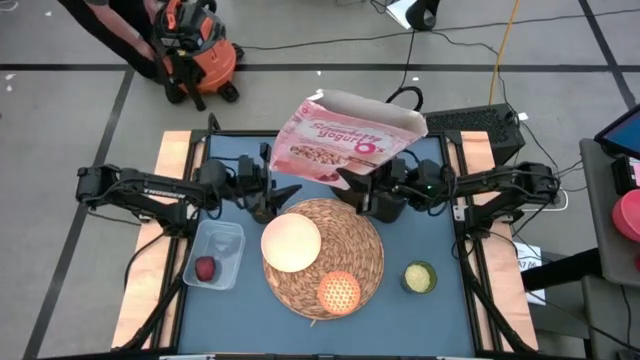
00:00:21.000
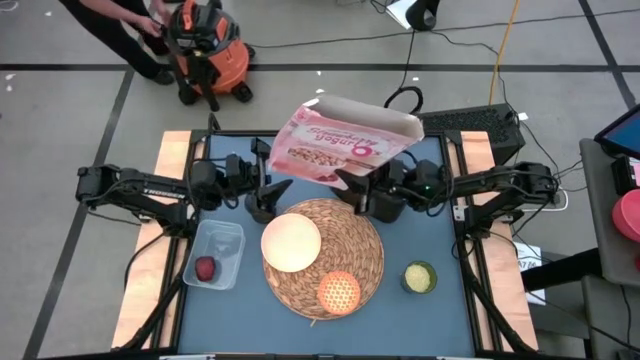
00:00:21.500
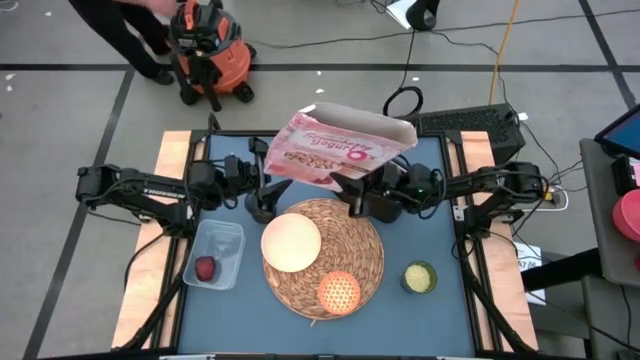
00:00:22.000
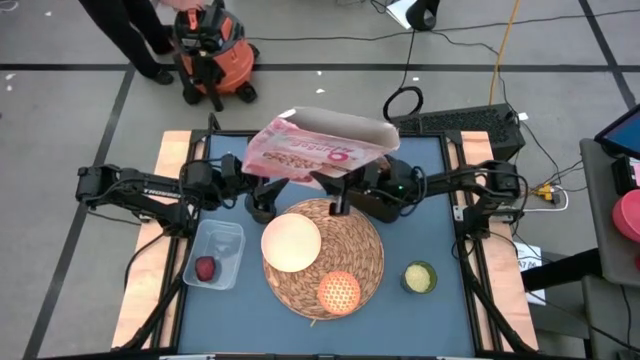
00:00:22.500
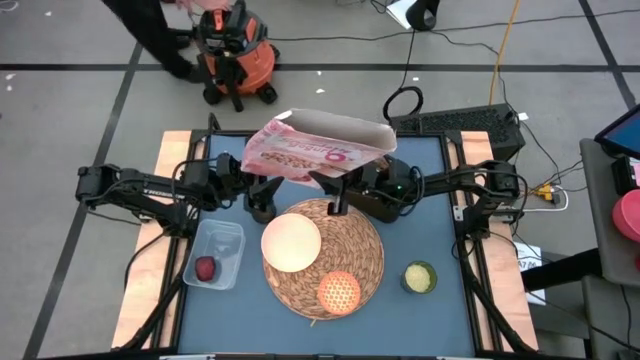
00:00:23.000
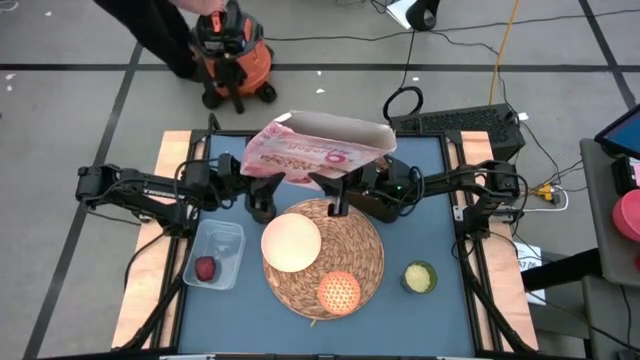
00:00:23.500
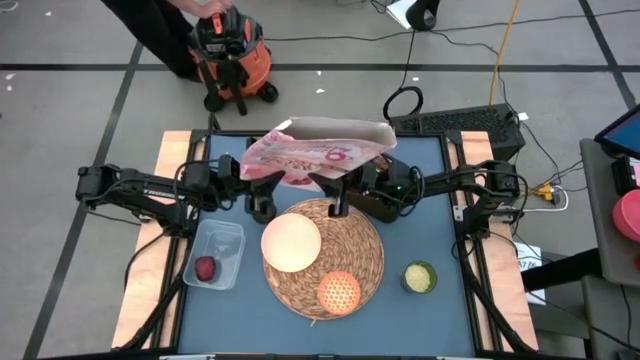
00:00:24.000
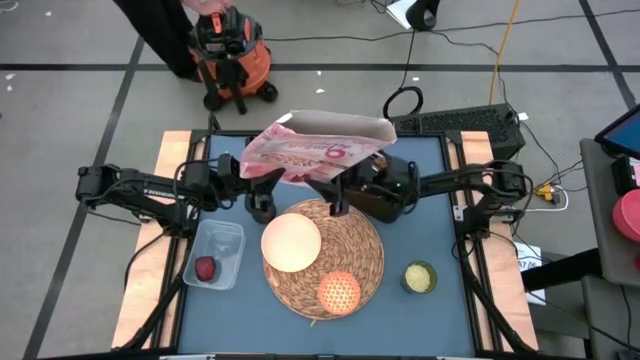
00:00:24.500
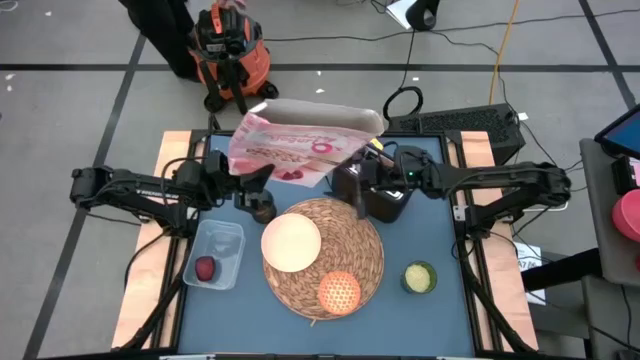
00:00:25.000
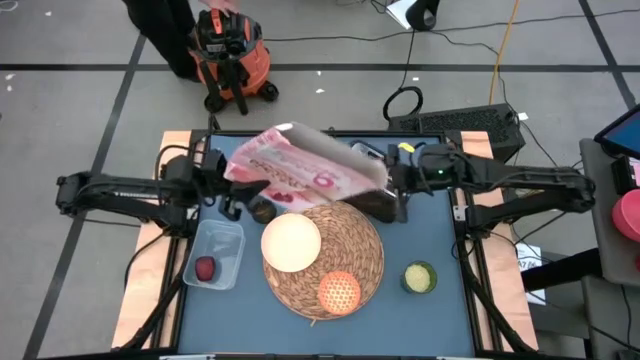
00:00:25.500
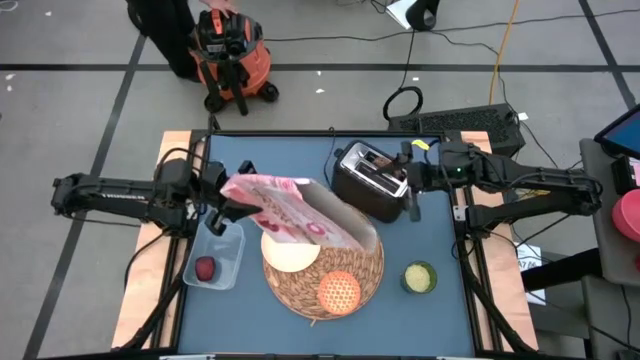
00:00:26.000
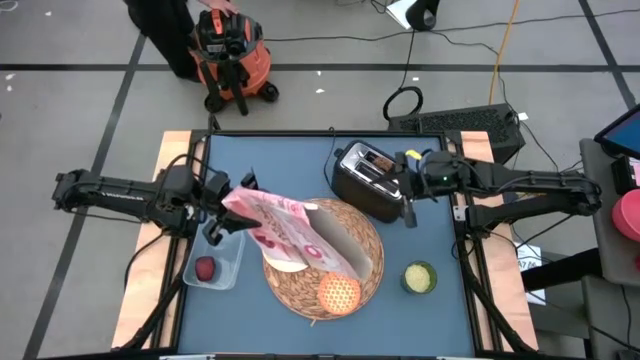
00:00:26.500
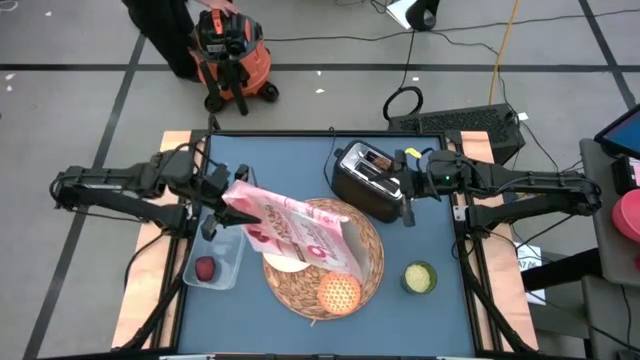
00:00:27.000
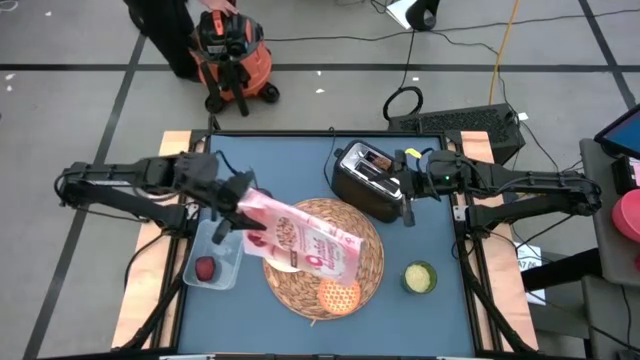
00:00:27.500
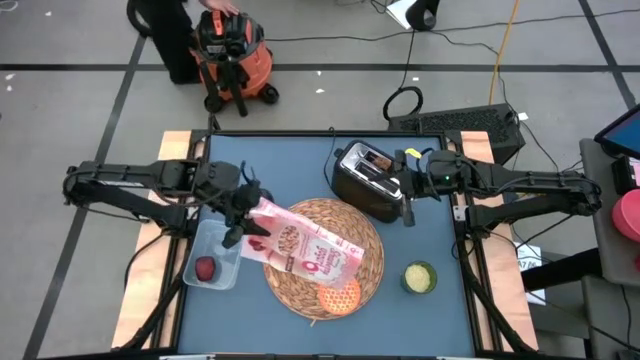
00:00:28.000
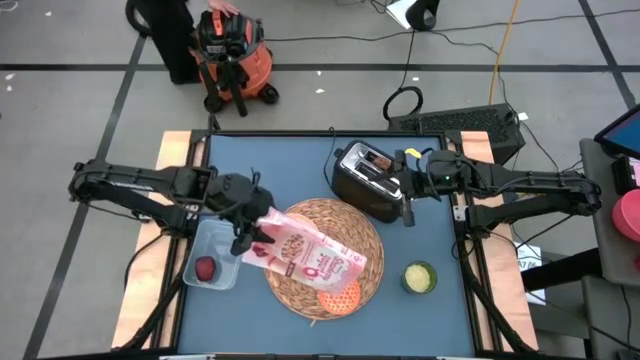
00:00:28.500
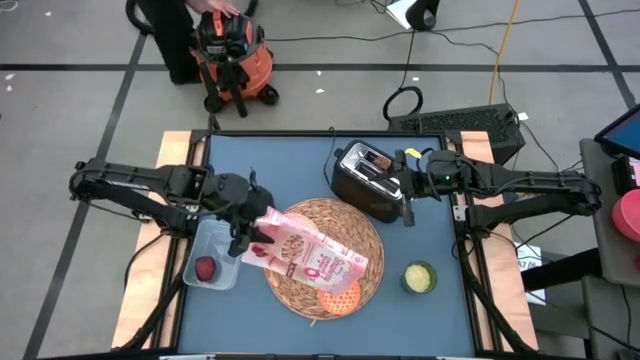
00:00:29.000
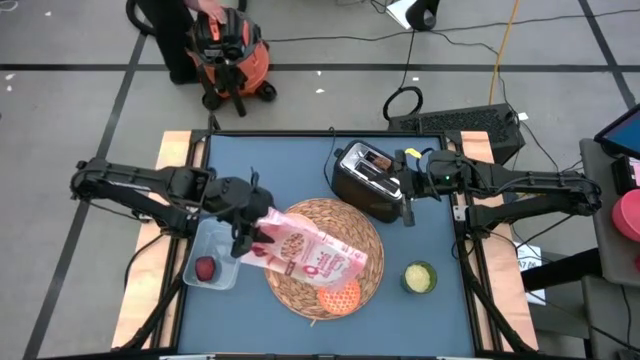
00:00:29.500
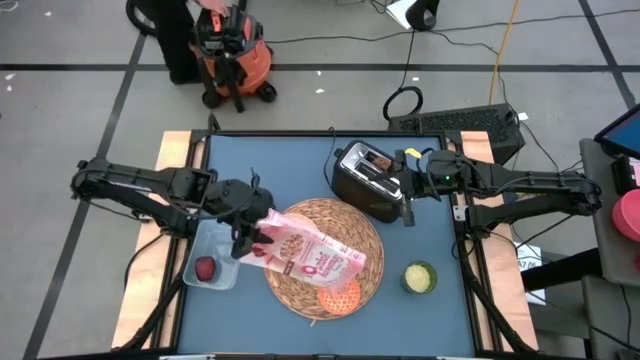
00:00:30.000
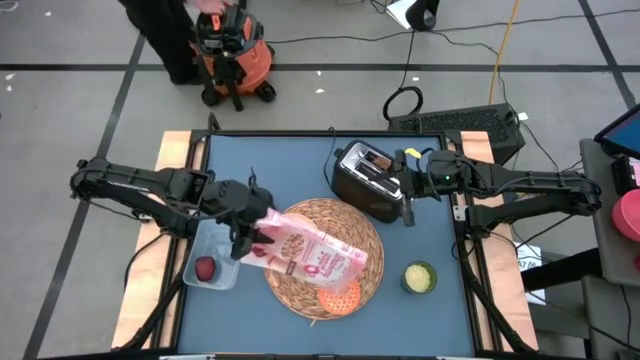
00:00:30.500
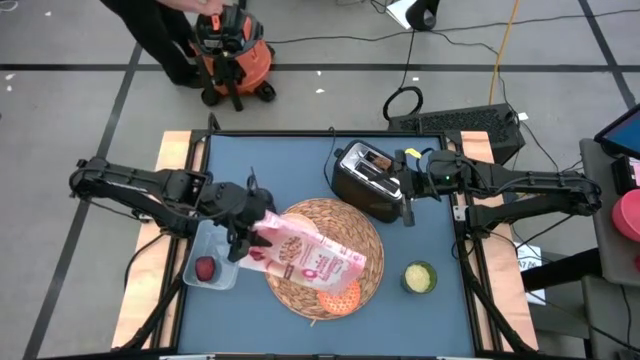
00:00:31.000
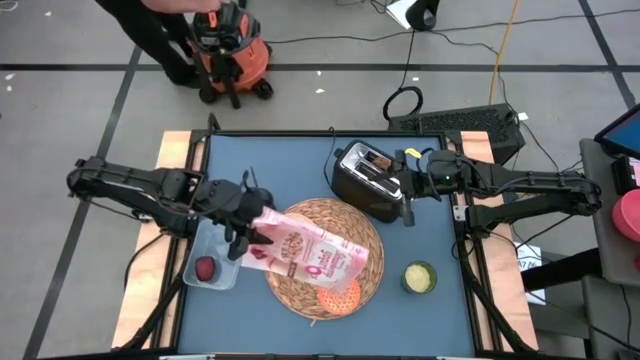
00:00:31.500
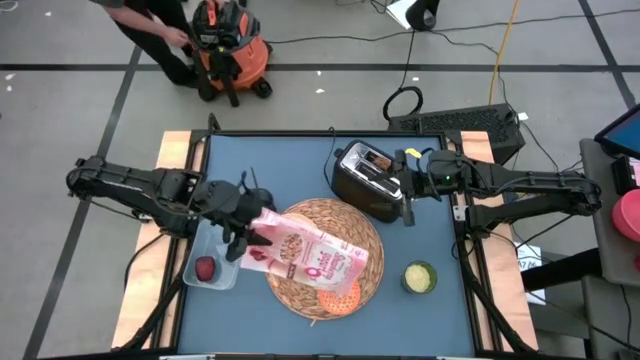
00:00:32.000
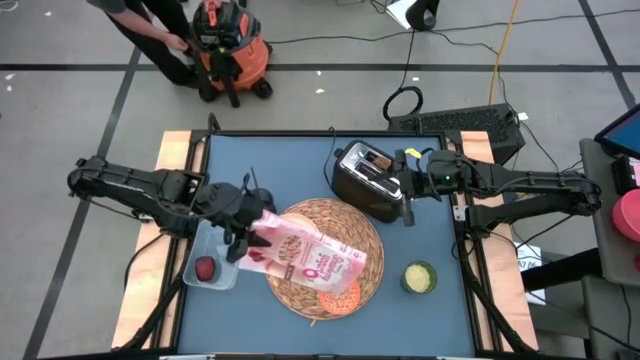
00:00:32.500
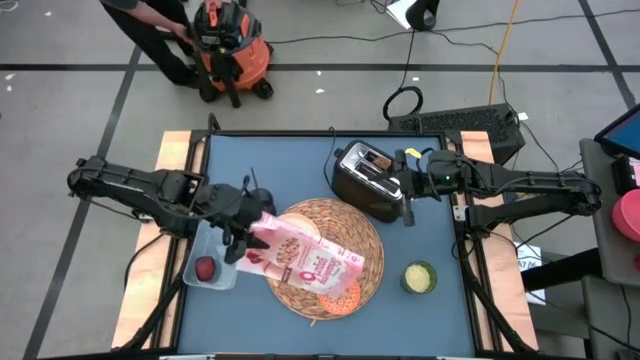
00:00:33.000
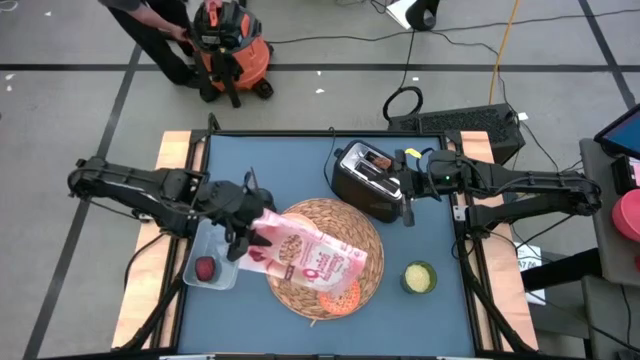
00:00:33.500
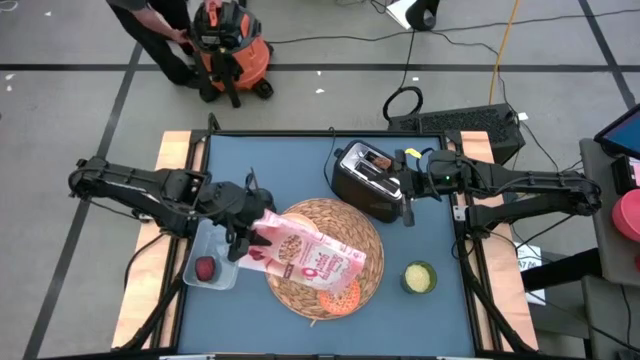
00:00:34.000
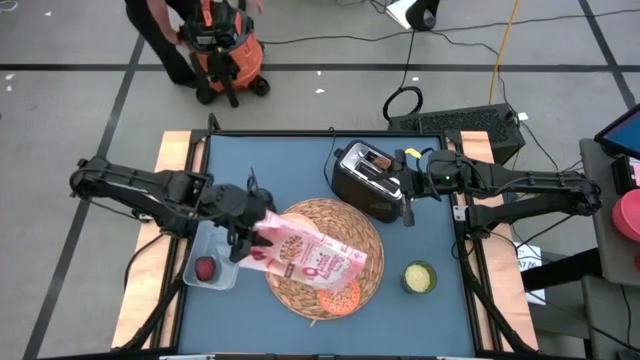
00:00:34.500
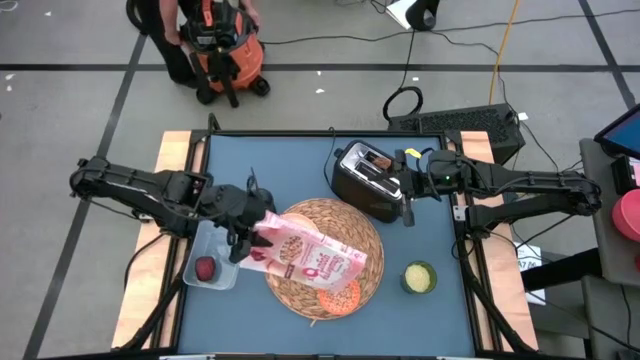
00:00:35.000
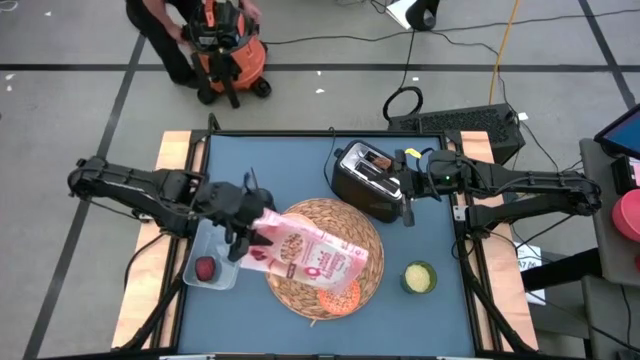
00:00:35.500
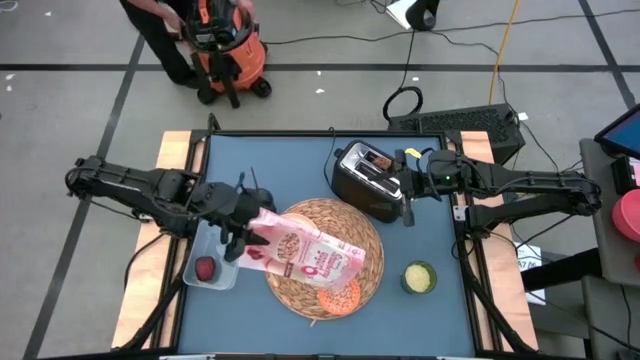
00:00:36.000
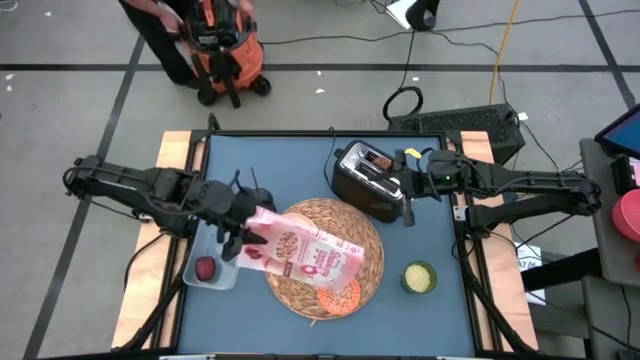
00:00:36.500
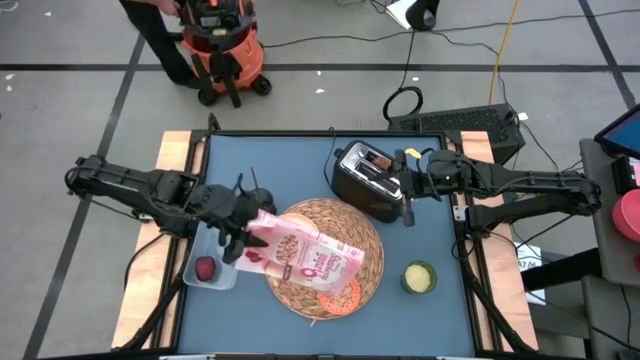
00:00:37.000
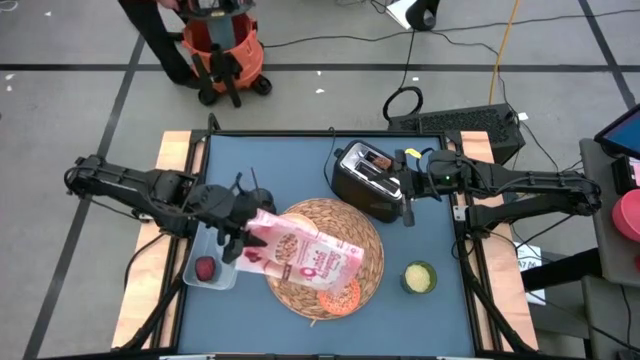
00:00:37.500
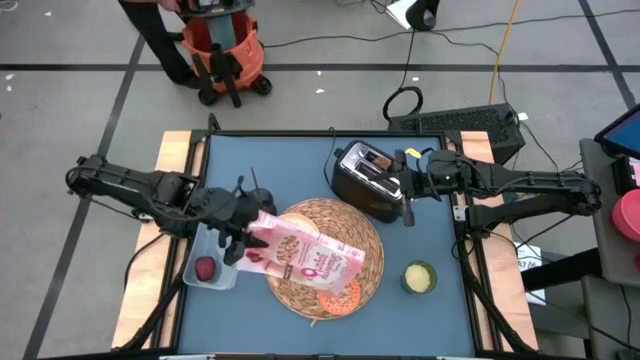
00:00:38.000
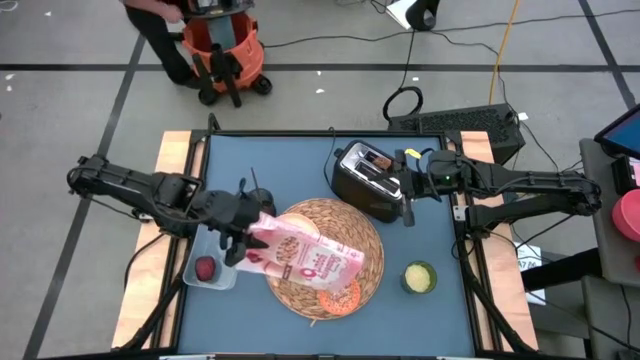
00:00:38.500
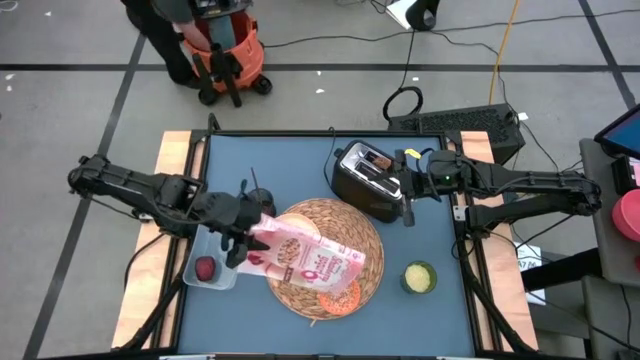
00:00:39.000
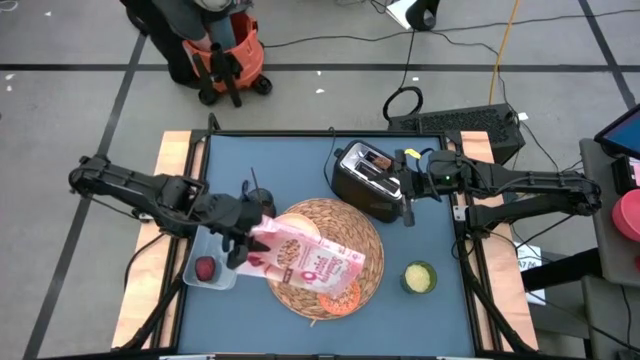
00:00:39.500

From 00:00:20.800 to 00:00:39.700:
Task: Arrange a breakfast setting
Pour the cereal into the orange bowl
